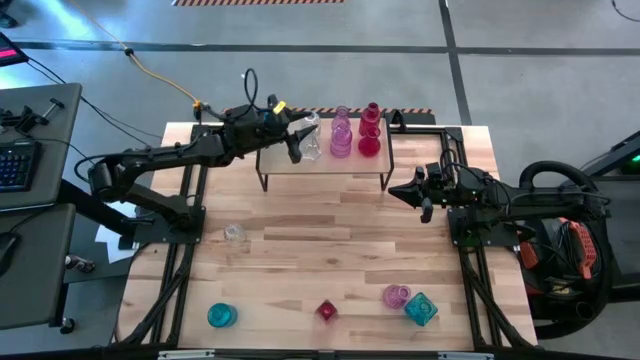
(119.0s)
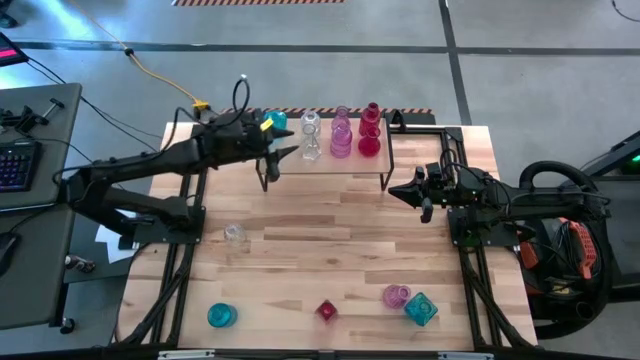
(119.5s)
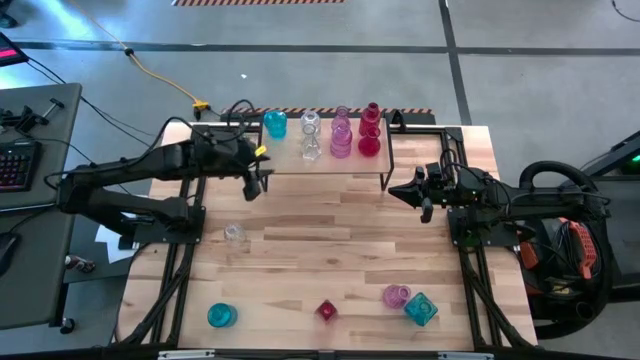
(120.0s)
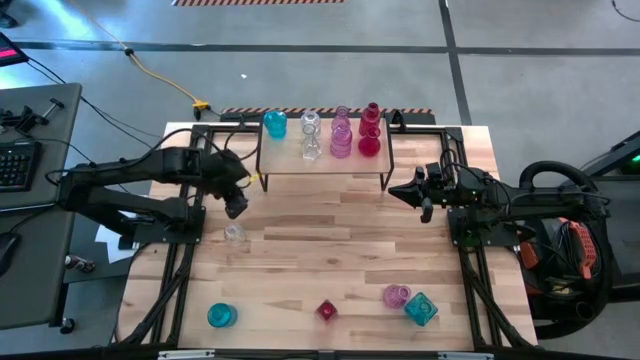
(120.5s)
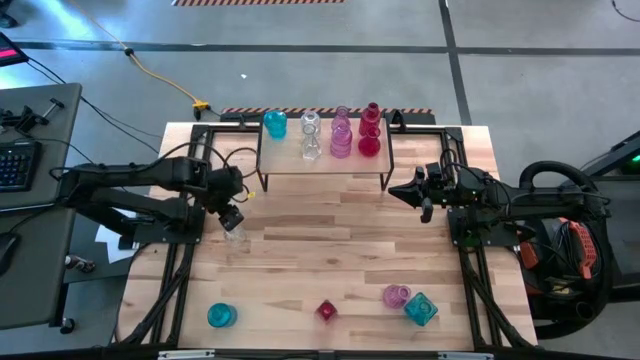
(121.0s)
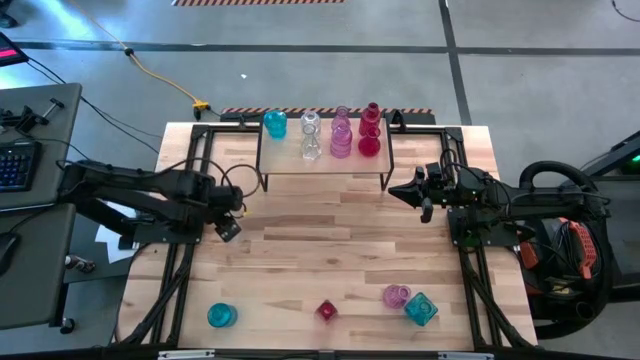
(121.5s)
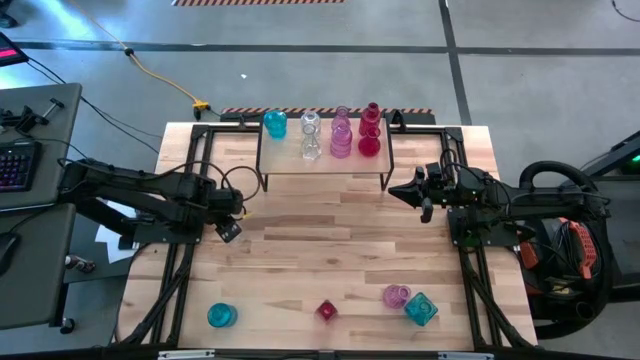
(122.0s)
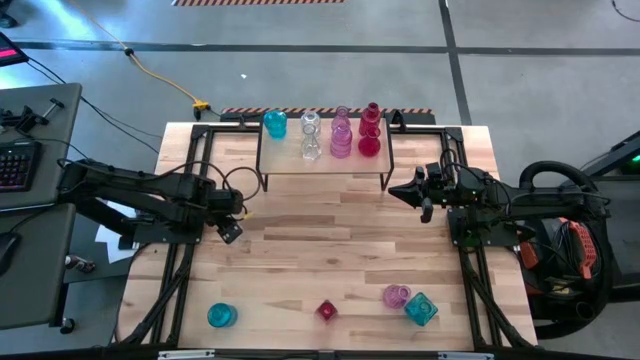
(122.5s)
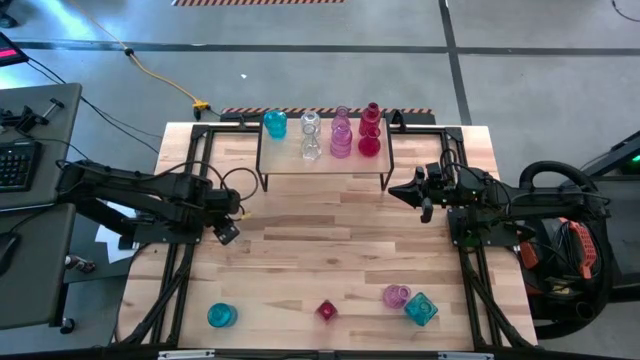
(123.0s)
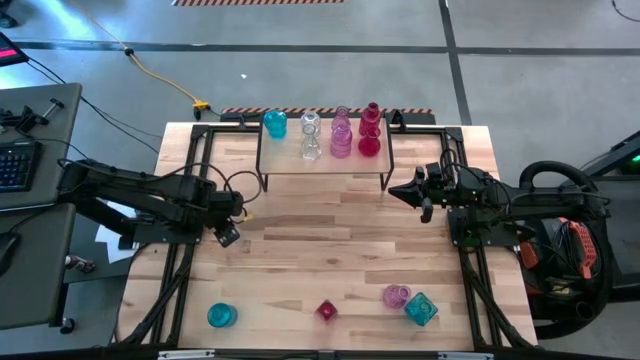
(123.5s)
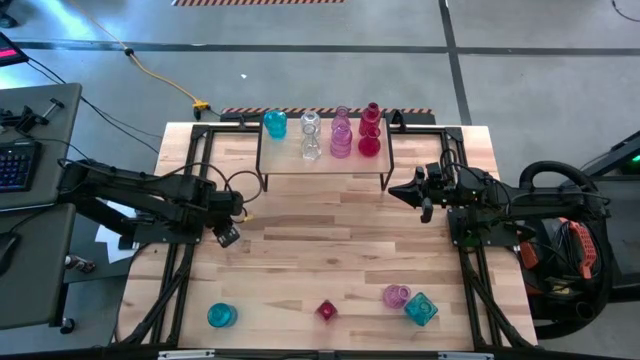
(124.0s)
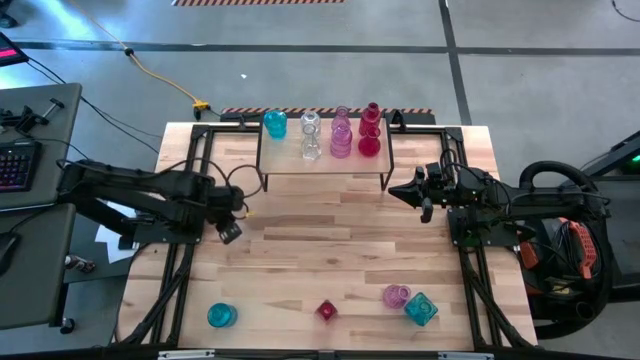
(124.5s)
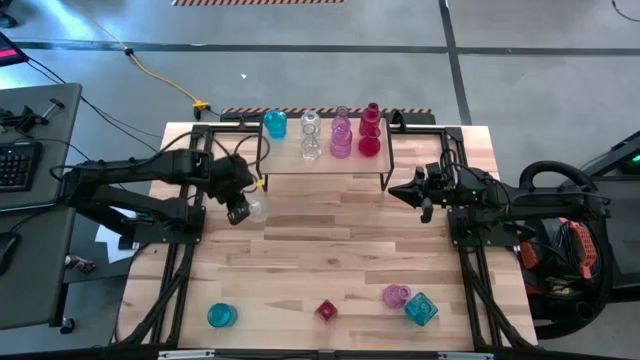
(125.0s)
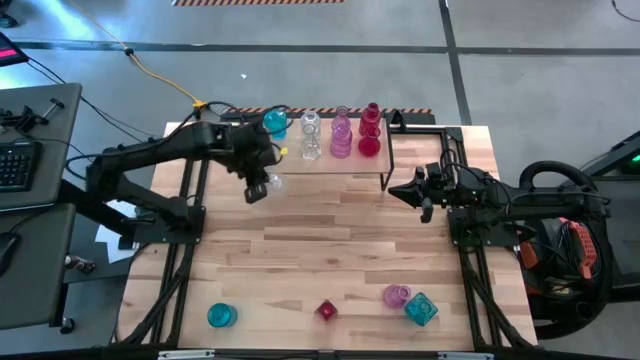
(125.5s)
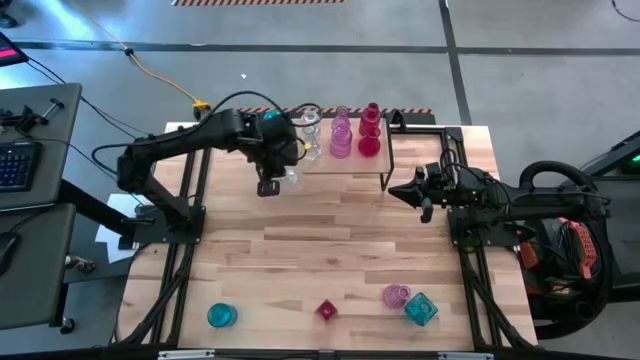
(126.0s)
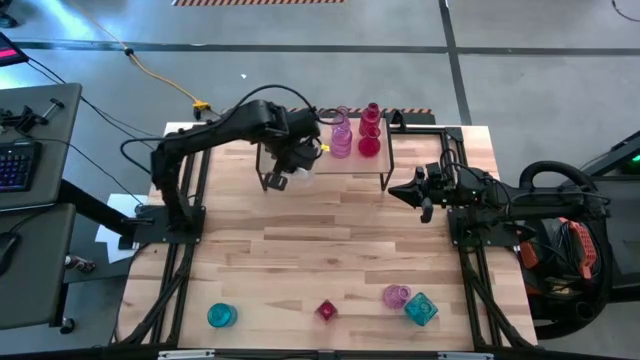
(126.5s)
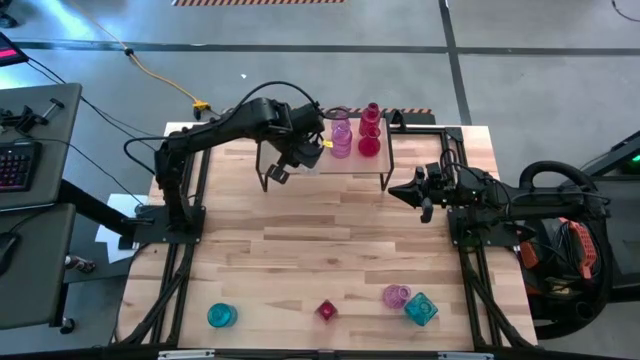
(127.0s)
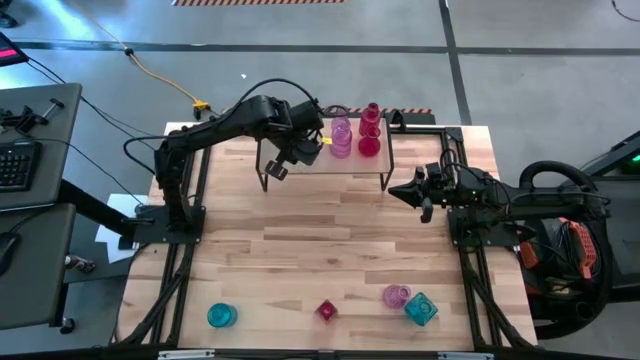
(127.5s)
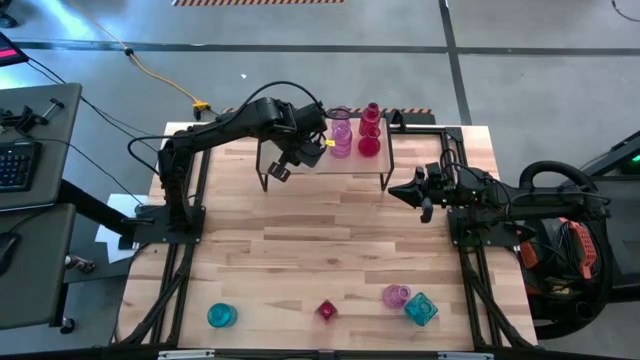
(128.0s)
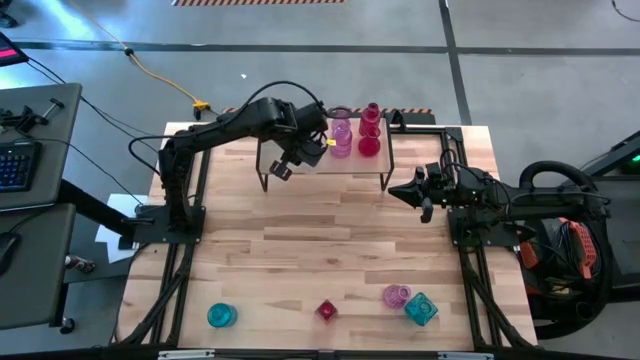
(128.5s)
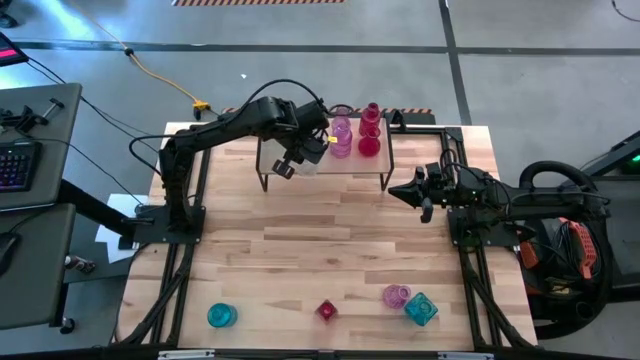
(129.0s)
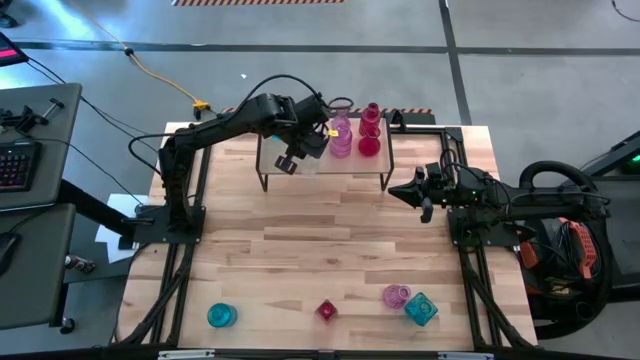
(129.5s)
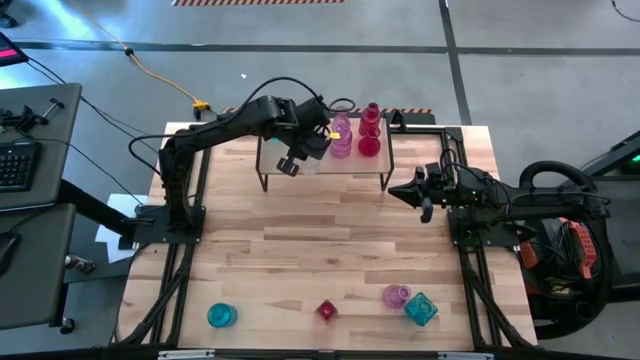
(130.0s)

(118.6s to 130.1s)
Task: sort vases onto shelf
Put the transparent vase on the shelf aligned with the other transparent vase

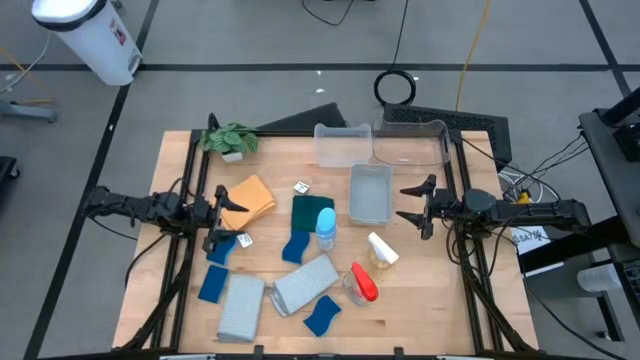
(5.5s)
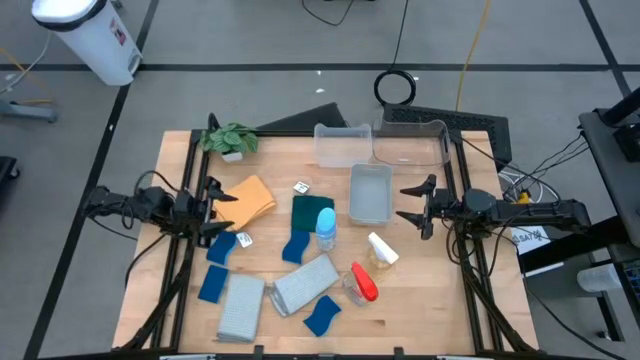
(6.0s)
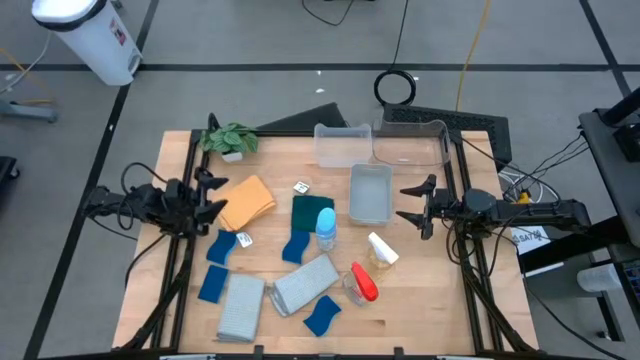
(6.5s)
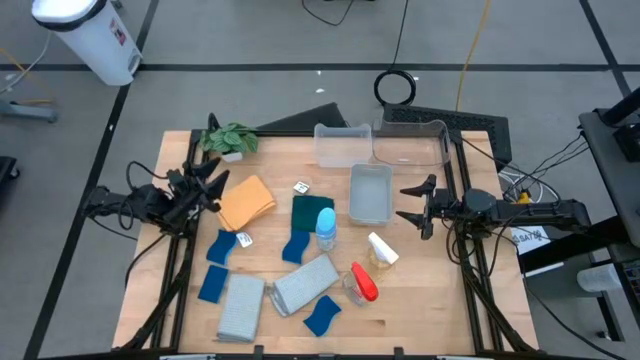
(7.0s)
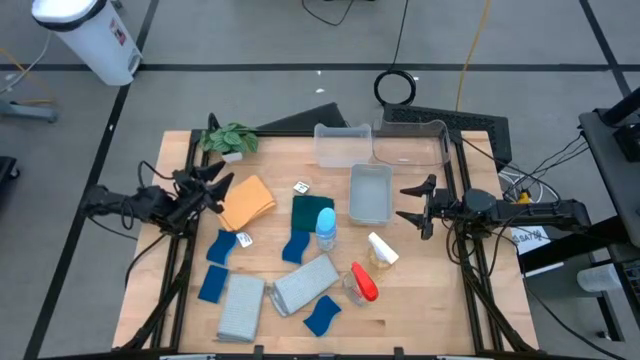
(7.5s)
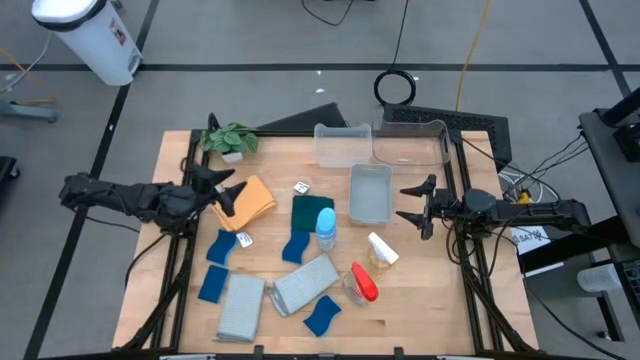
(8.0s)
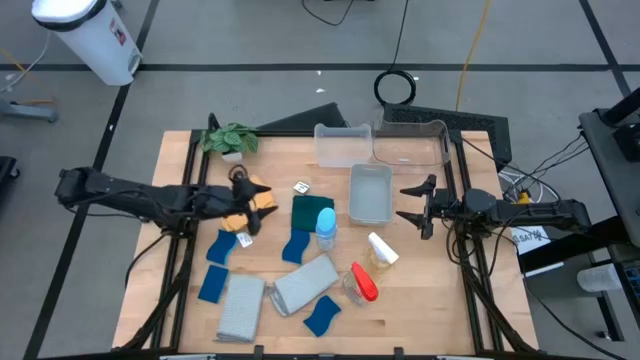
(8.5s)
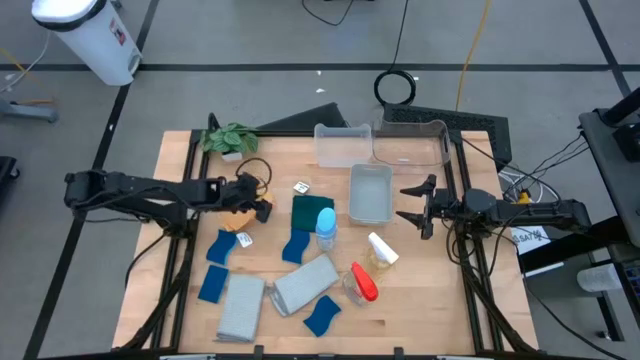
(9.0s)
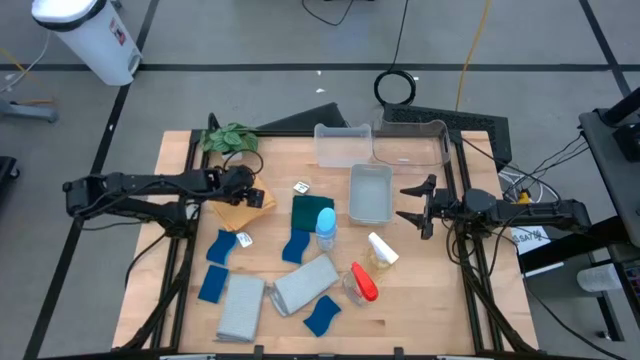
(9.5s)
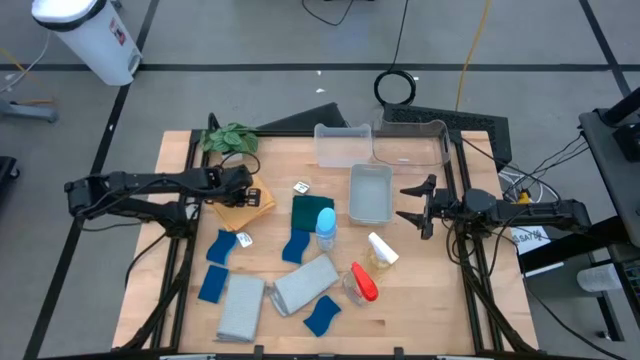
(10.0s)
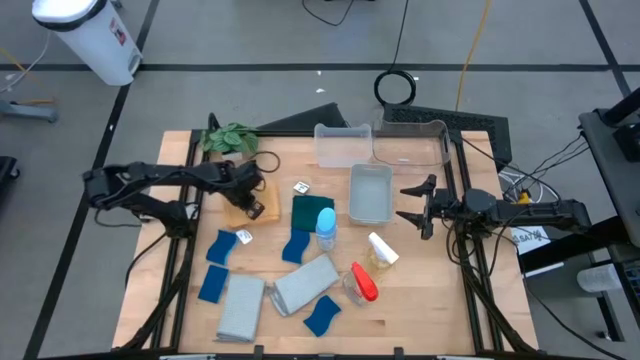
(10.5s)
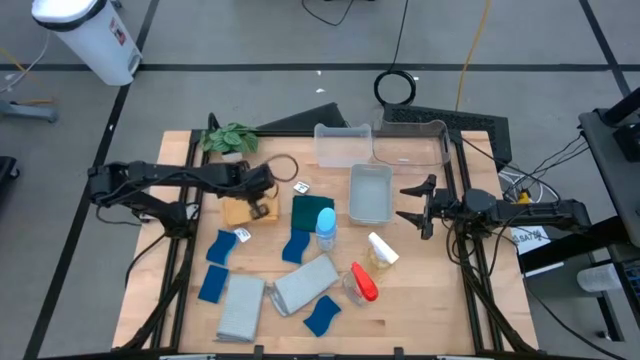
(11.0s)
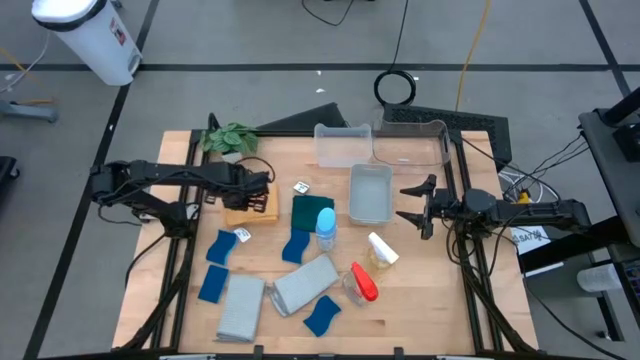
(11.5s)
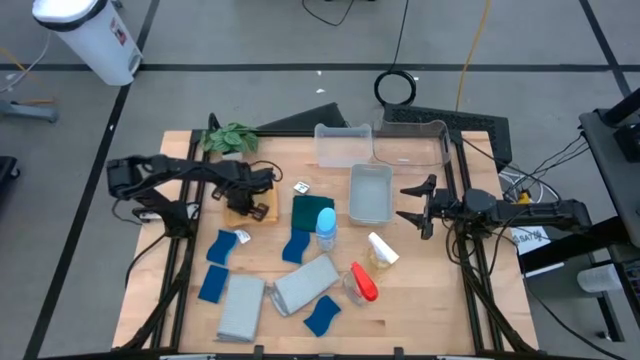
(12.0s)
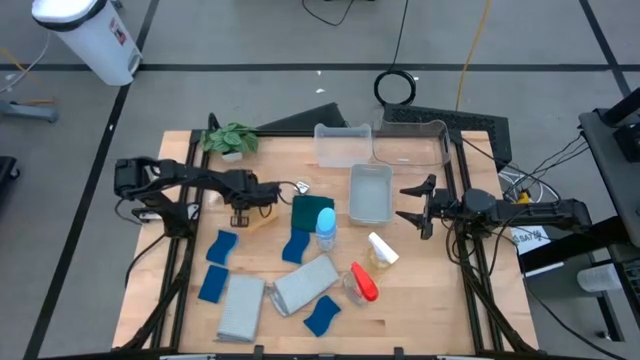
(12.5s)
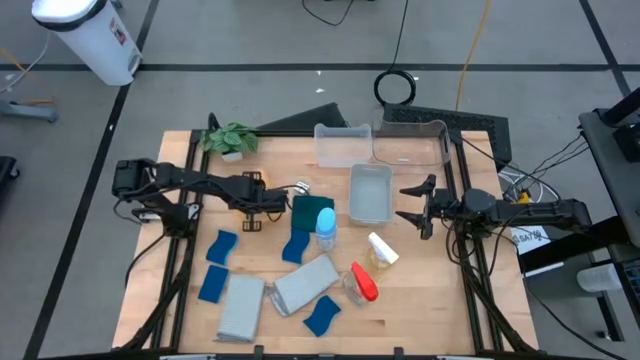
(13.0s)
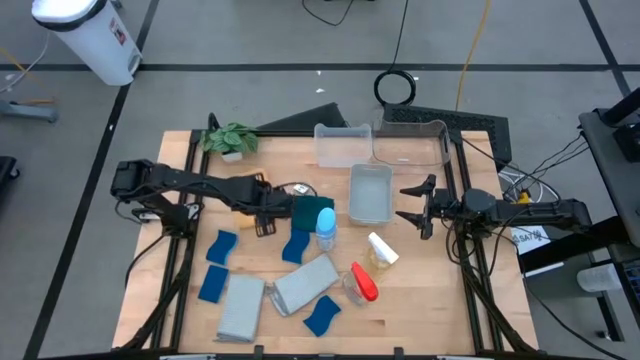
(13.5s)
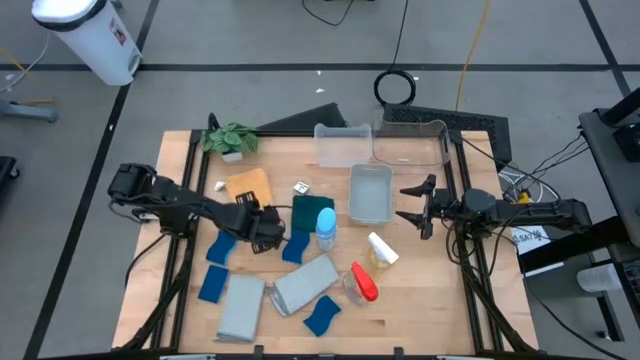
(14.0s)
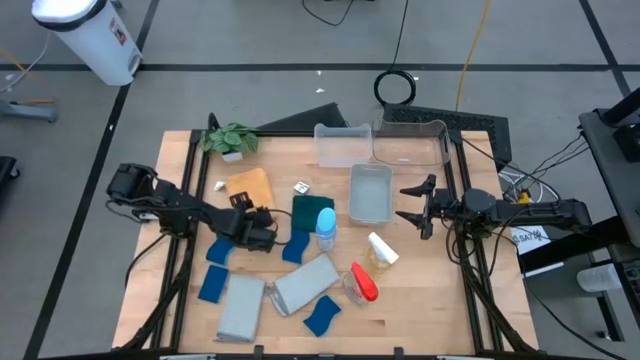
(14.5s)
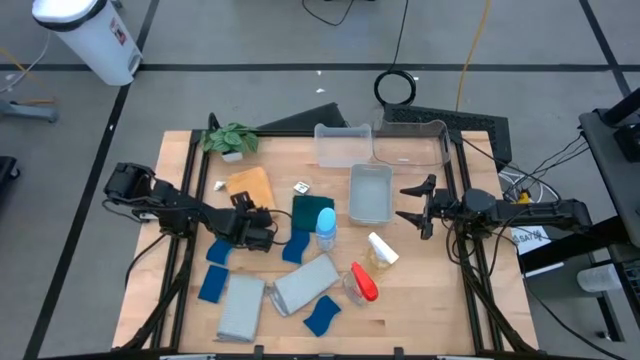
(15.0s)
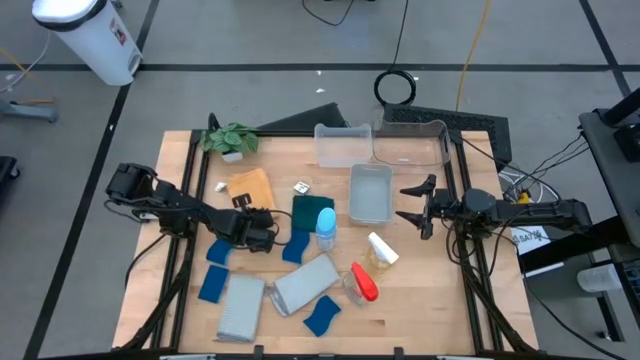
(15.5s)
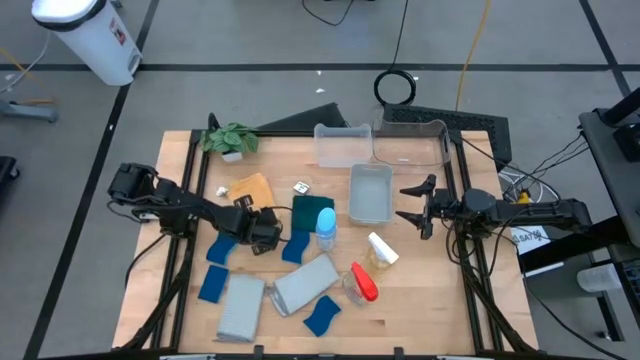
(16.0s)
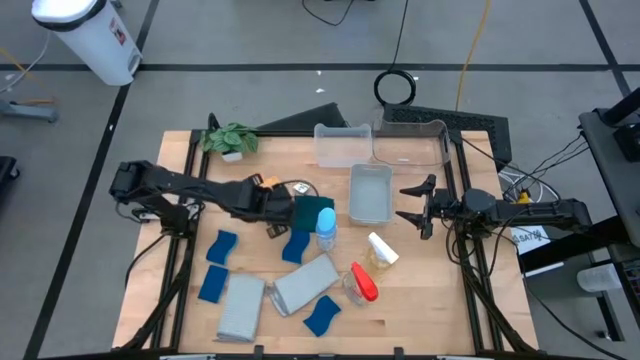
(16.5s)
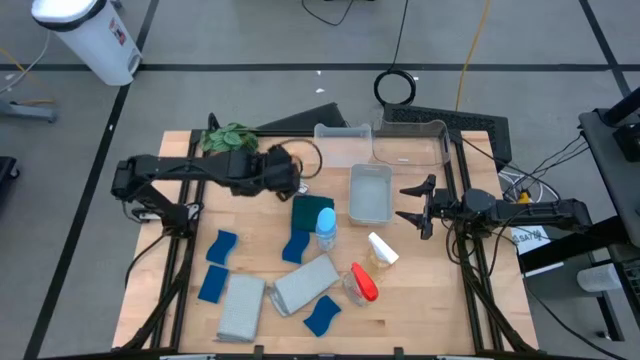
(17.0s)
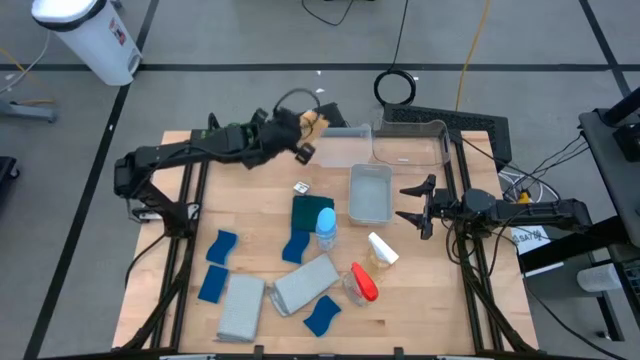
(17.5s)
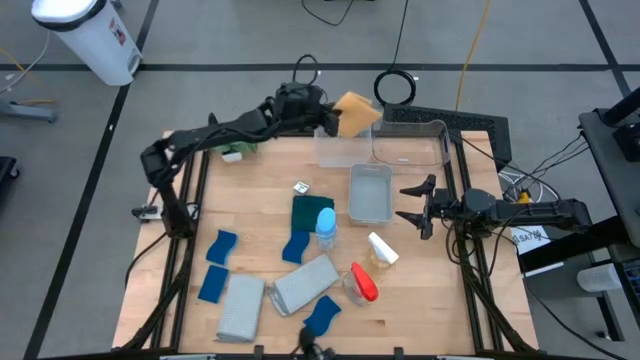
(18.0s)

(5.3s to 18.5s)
Task: Pick & Place Kitchen Items
Put the yellow towel into the top right transparent bin
